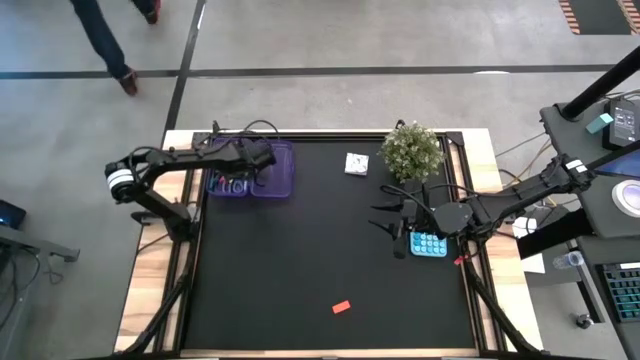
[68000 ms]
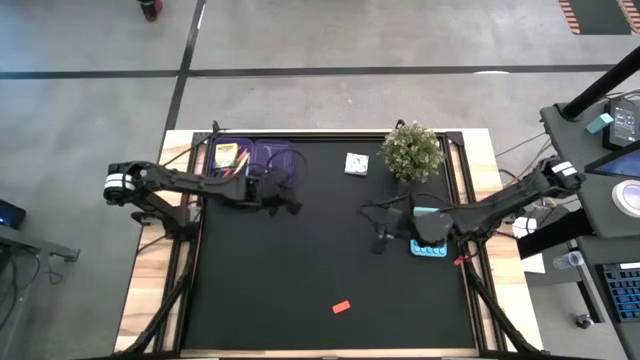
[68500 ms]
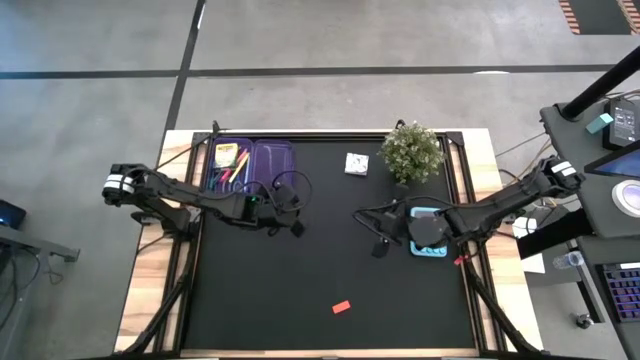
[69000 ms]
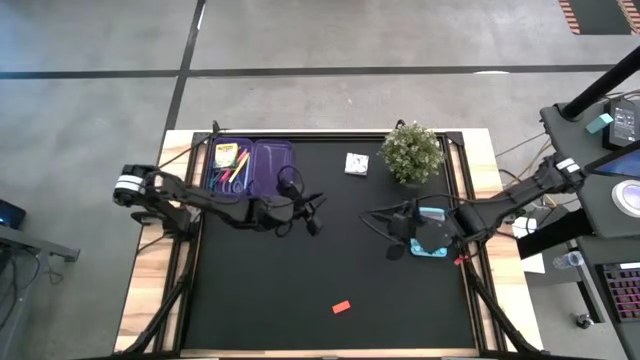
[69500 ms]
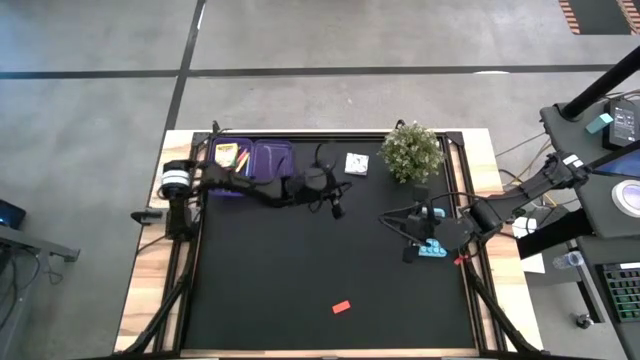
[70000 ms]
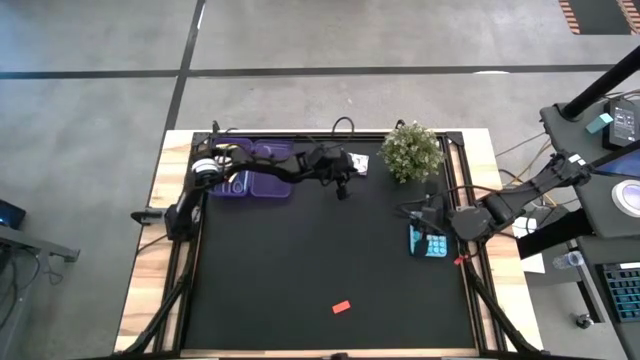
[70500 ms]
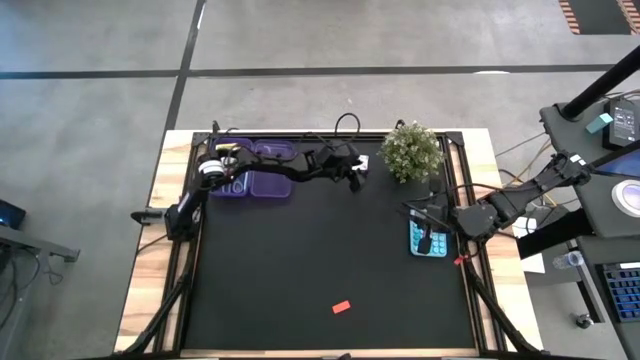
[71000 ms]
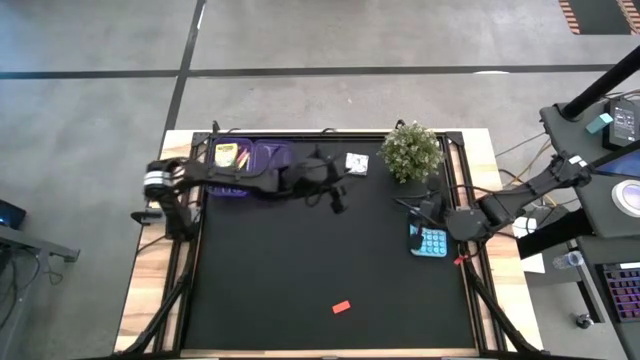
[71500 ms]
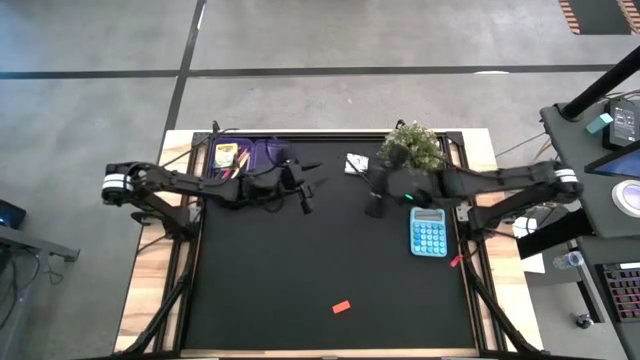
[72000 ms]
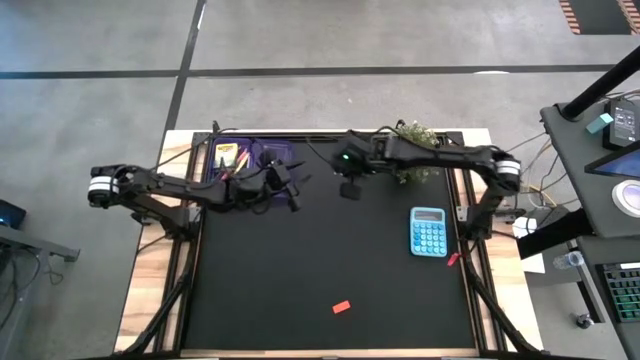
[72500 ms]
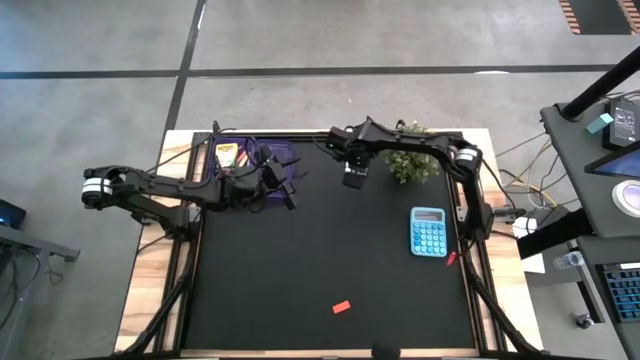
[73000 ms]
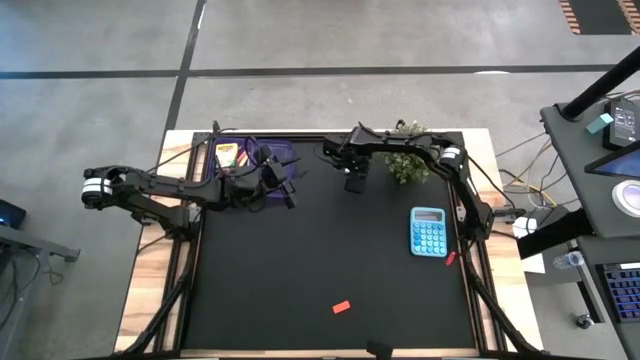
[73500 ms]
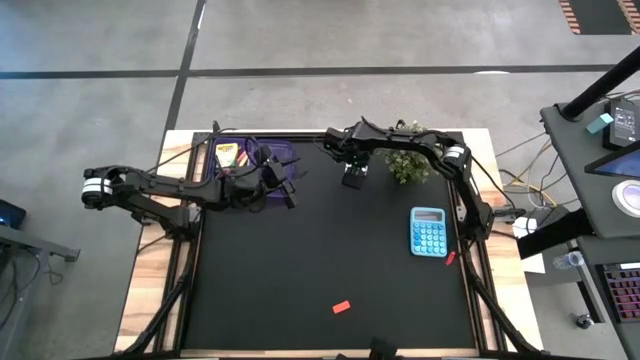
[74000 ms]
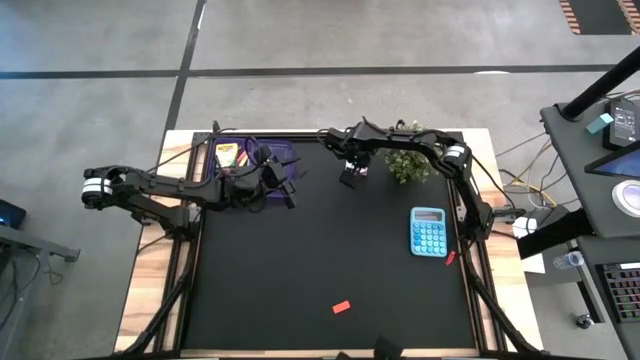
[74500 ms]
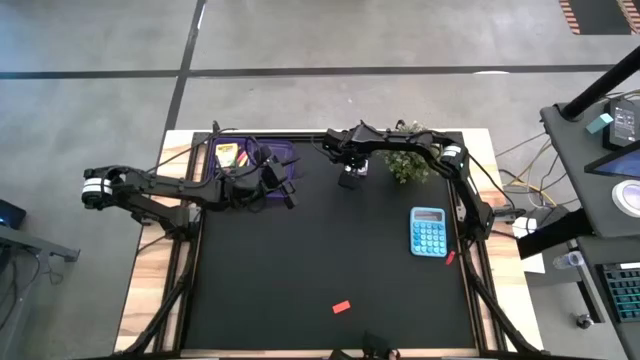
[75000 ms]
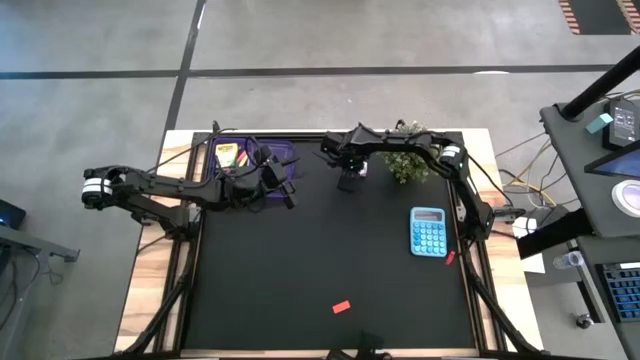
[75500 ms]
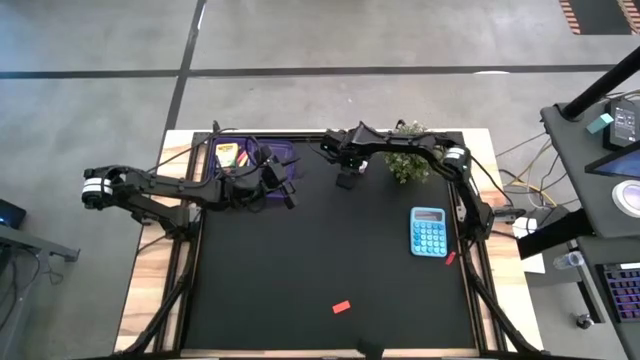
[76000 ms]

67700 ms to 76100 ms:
Task: Pack school essentials
Put the sticky note into the purple supply box

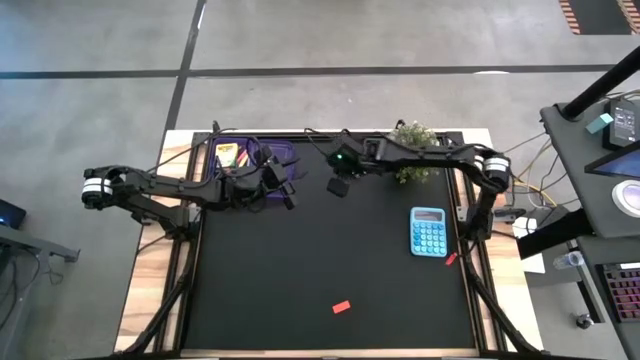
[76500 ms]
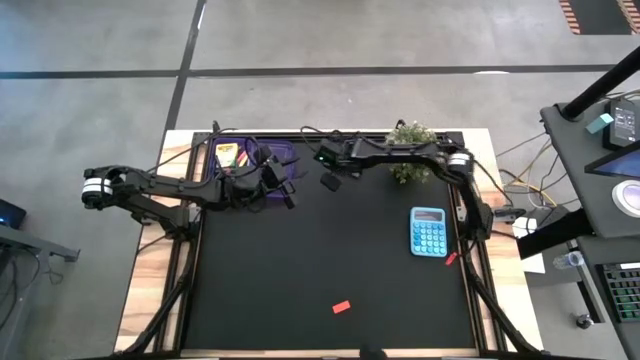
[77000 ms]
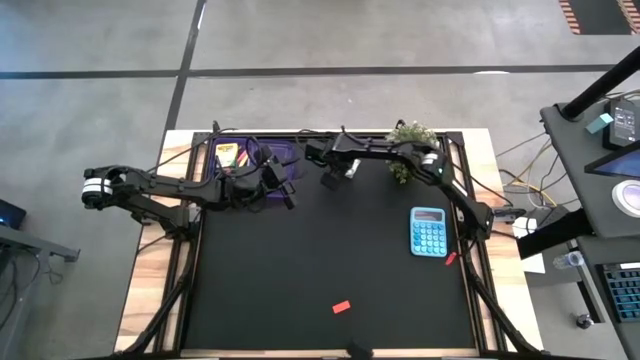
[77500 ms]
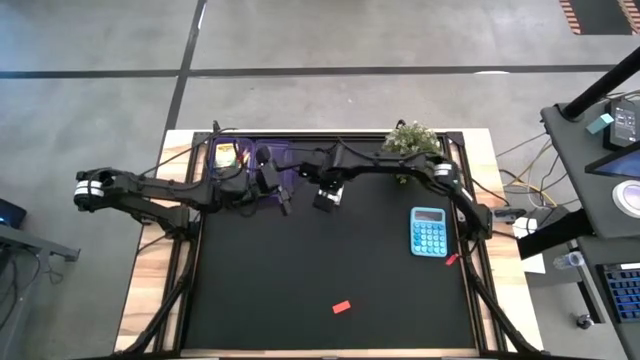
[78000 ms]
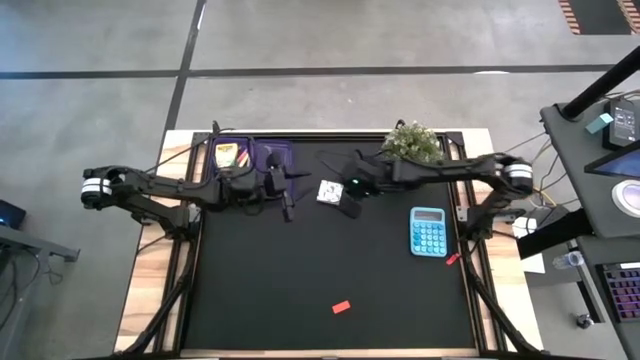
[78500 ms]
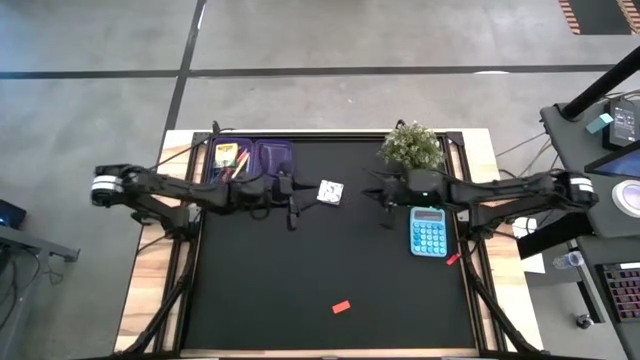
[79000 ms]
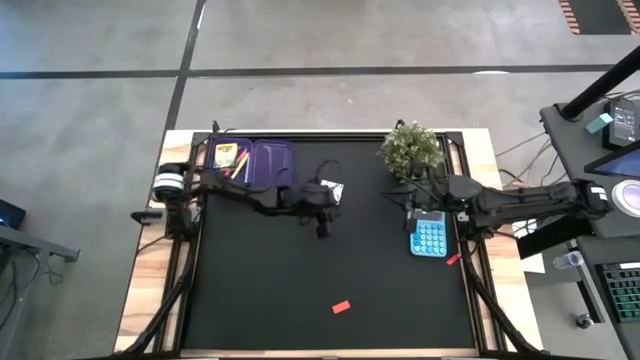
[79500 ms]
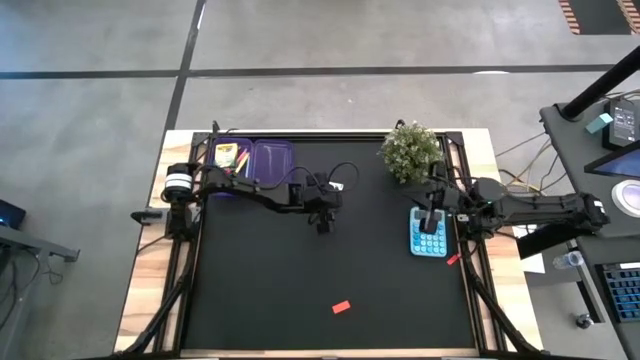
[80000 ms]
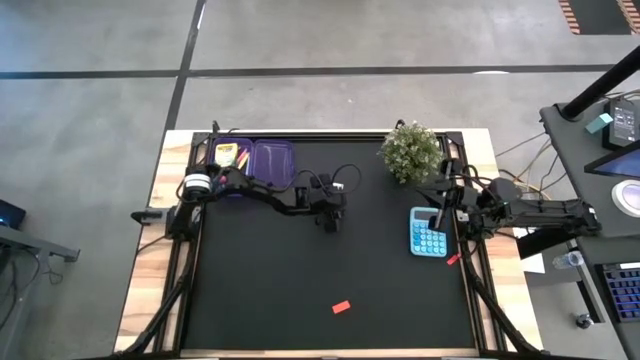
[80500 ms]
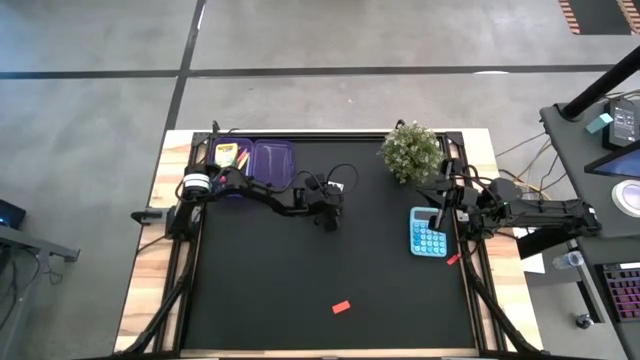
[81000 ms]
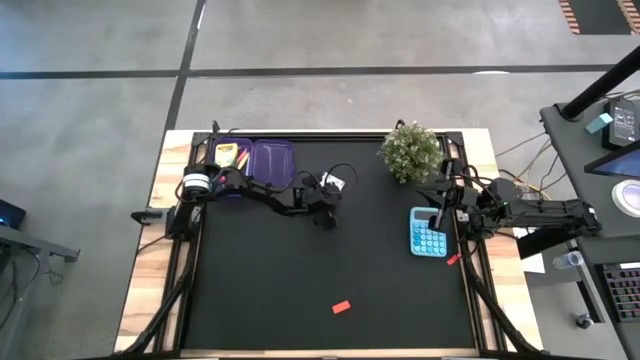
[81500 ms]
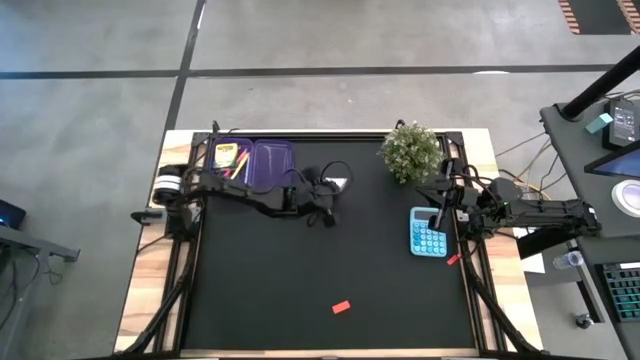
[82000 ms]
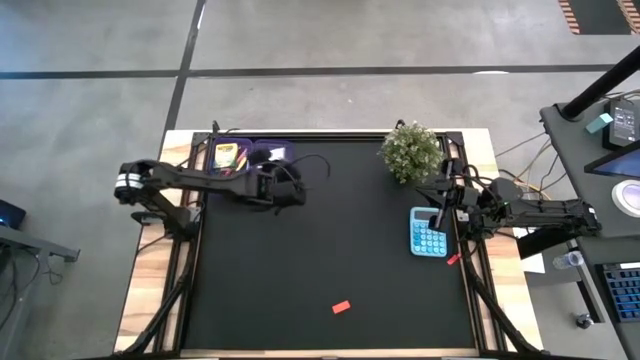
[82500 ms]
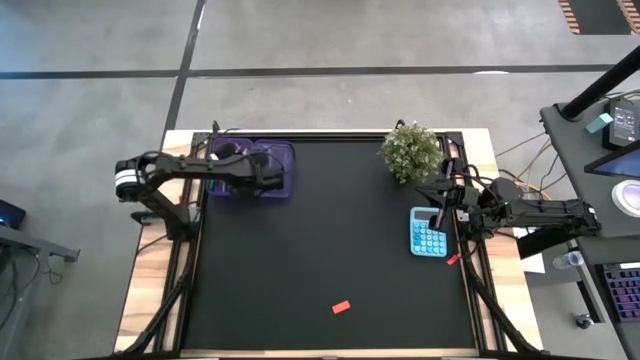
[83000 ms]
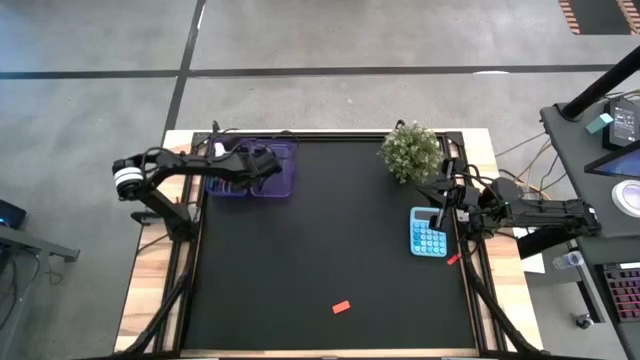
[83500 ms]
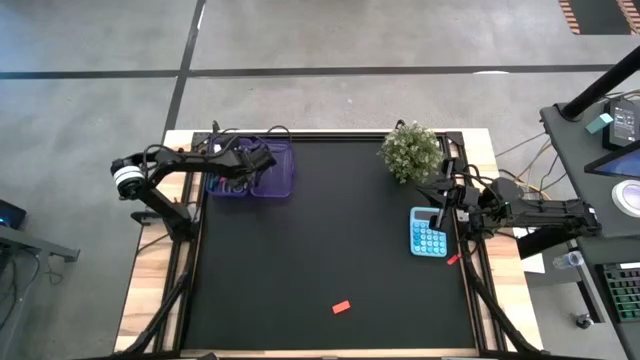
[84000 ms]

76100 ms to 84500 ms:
Put the sticky note into the purple supply box

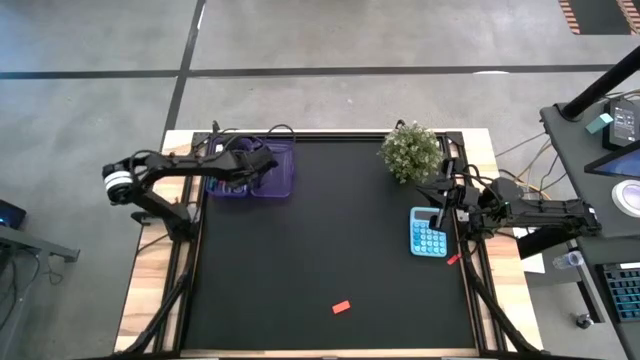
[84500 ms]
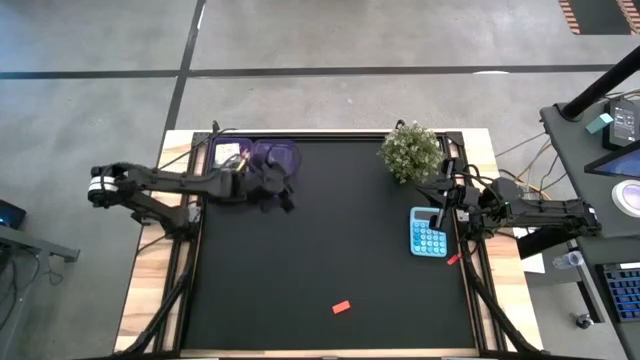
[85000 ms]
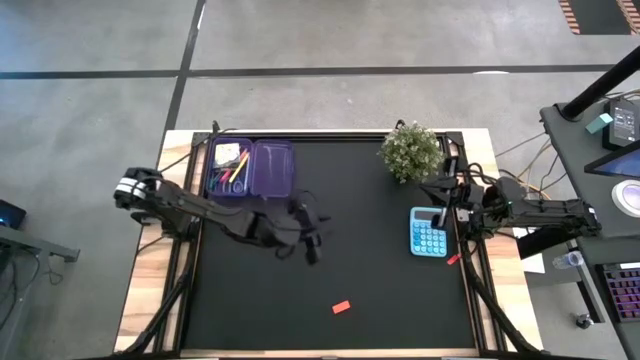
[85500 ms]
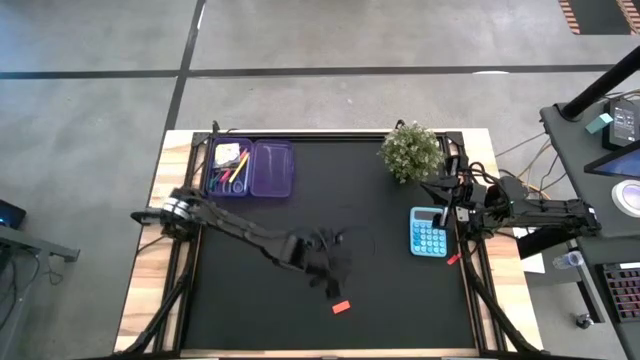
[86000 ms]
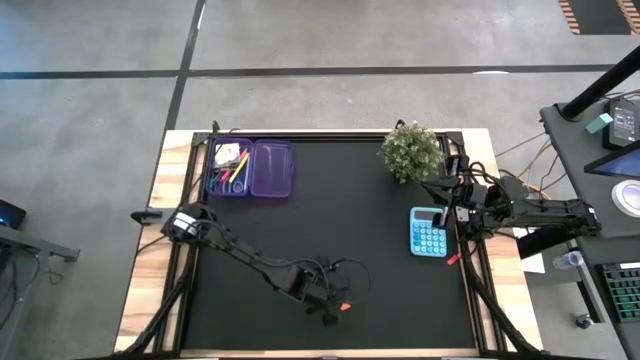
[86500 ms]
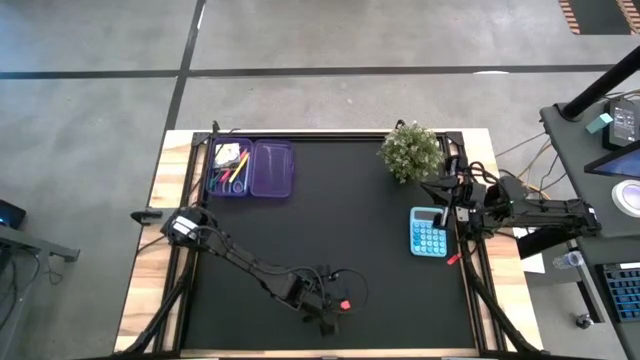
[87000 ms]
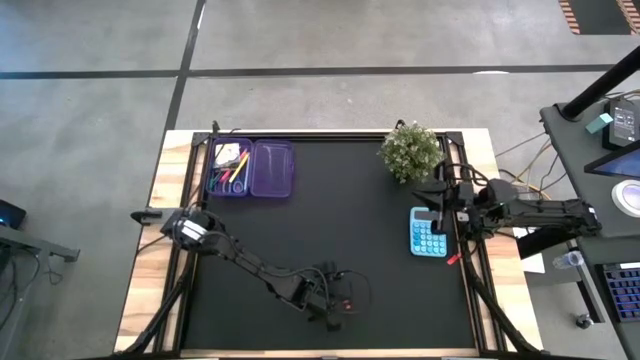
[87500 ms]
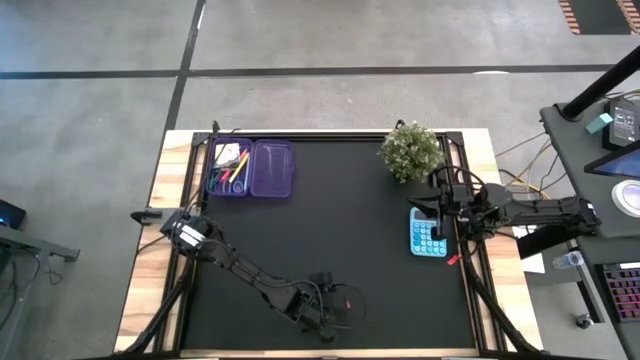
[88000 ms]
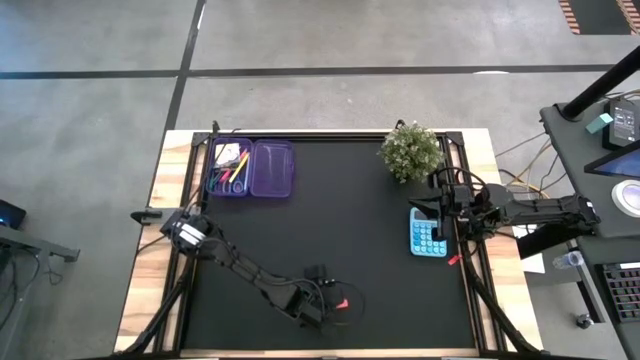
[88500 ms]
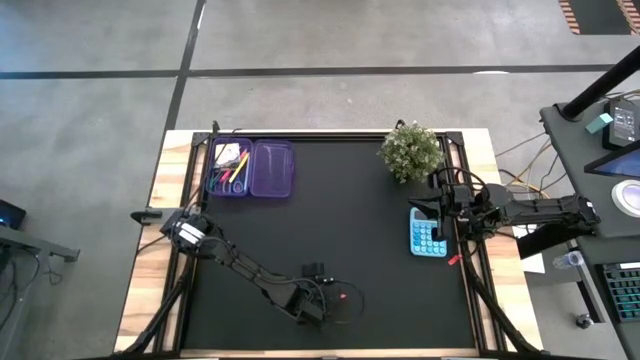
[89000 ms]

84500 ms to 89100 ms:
Put the orange eraser into the purple supply box
